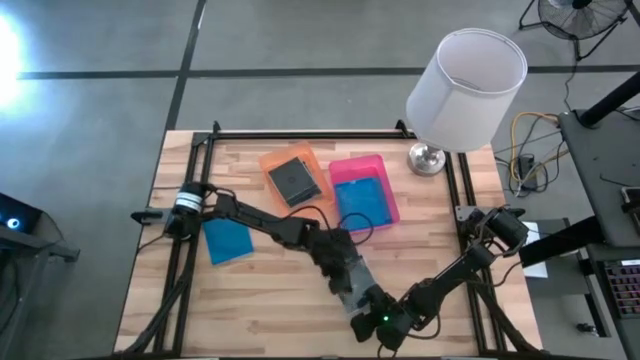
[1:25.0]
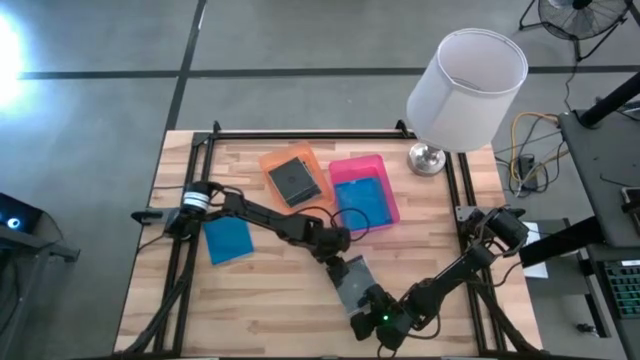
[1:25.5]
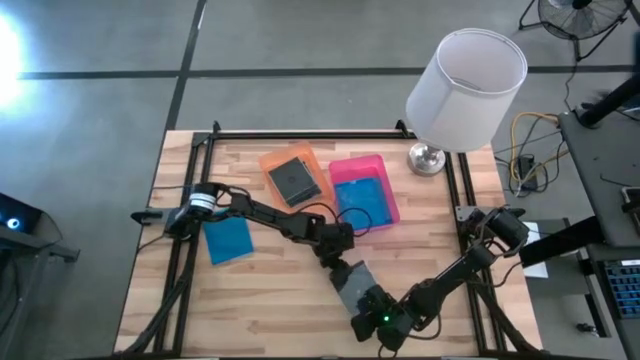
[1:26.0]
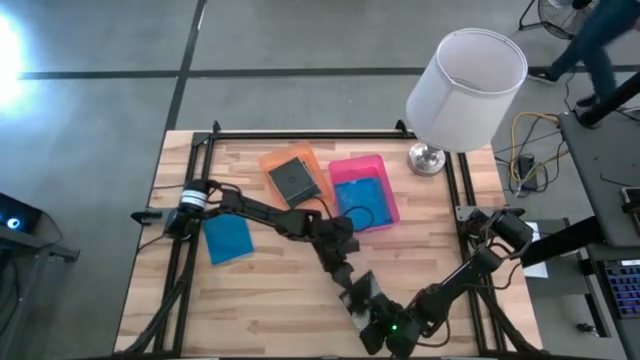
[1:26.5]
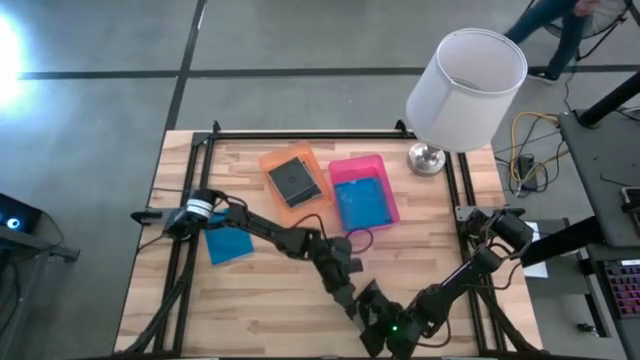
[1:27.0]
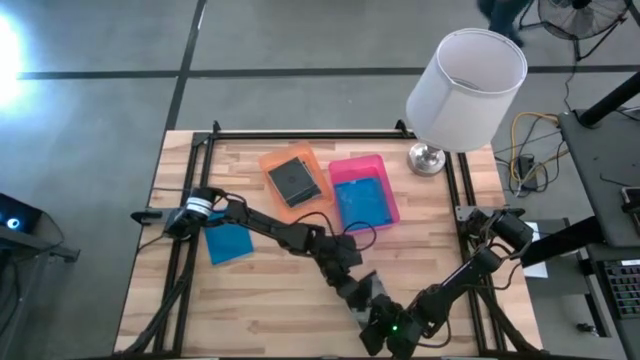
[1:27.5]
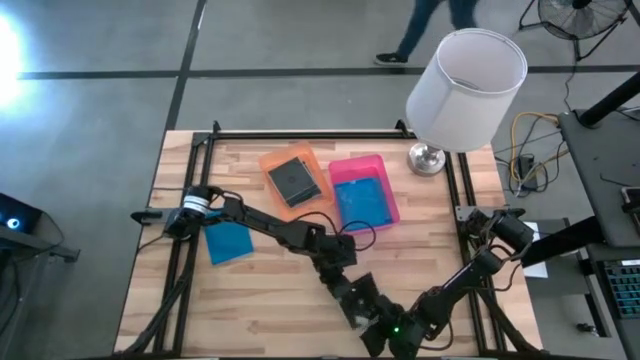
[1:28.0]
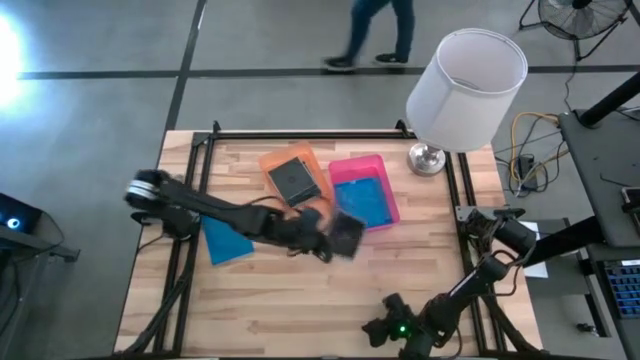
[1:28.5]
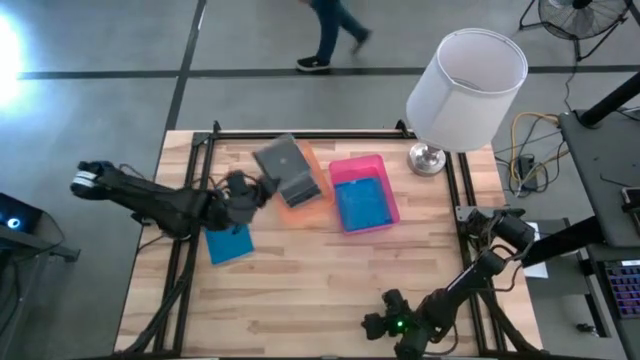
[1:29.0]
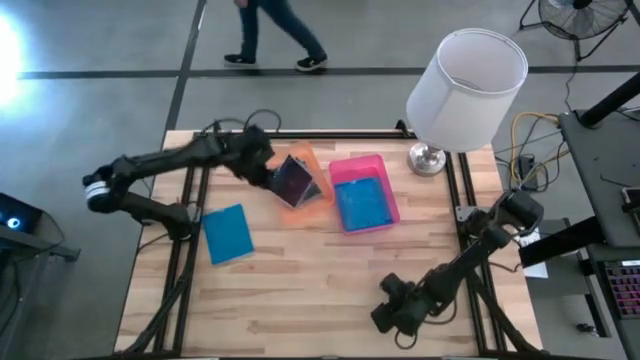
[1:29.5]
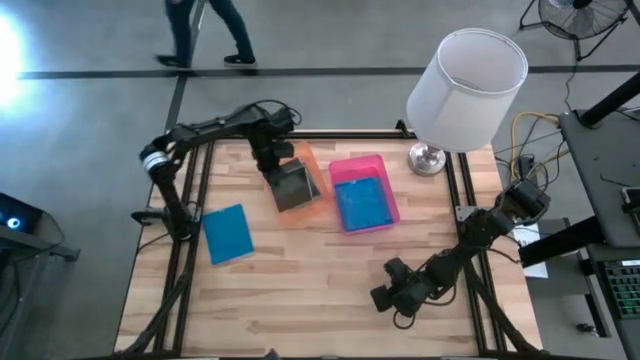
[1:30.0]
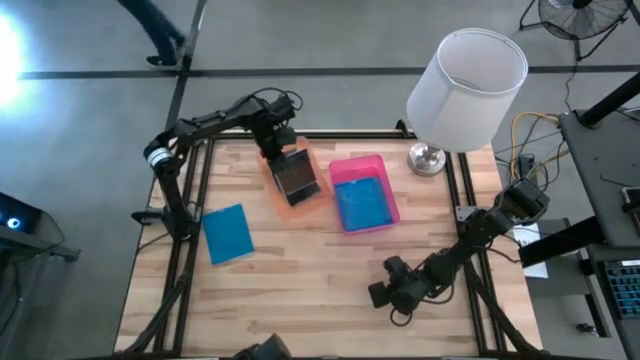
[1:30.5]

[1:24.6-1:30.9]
Task: Pick & place jewel cases by type
Put the black cd case into the orange bin

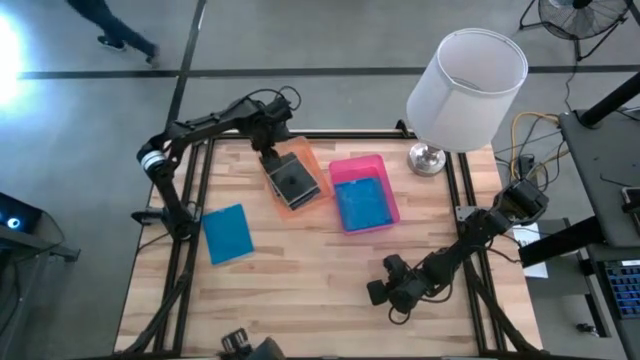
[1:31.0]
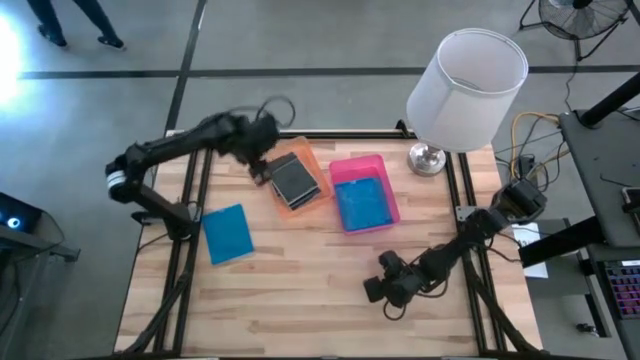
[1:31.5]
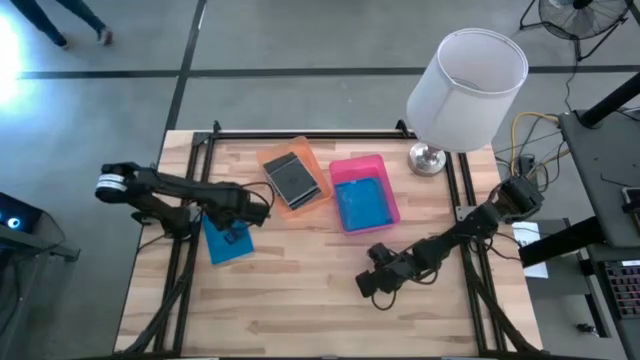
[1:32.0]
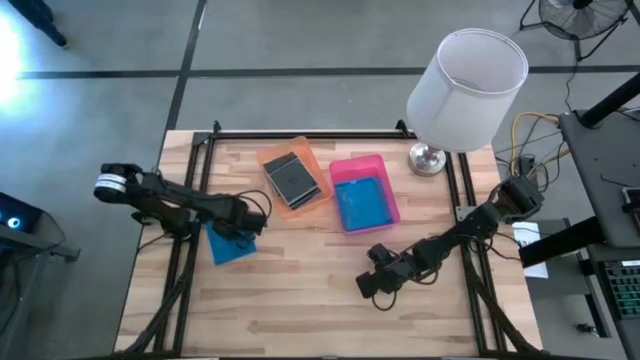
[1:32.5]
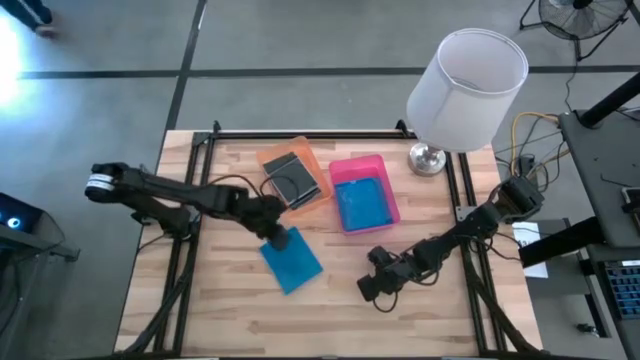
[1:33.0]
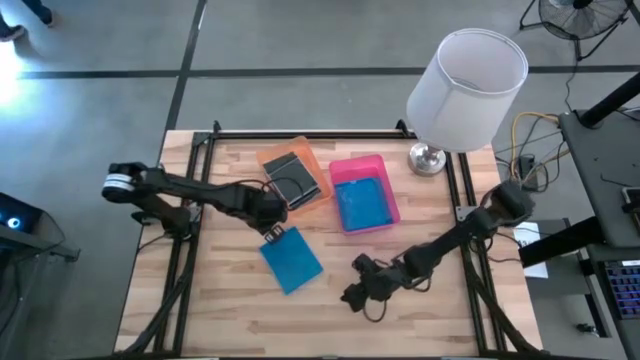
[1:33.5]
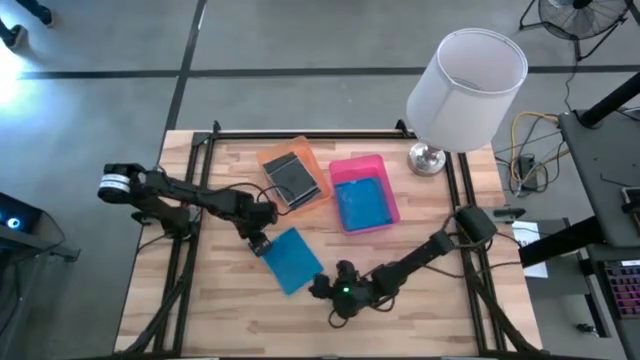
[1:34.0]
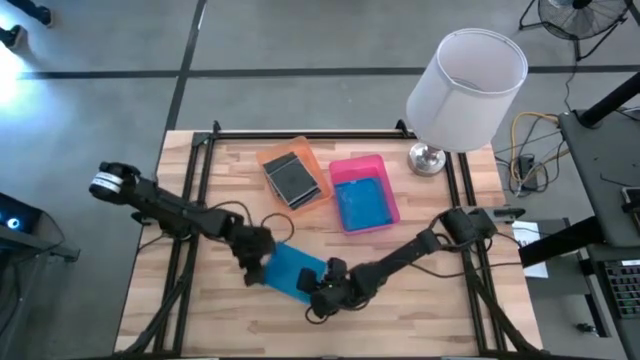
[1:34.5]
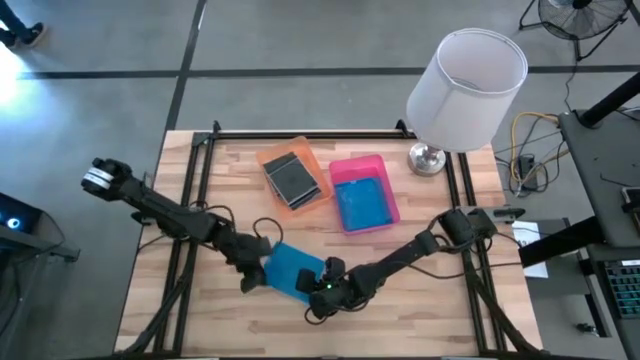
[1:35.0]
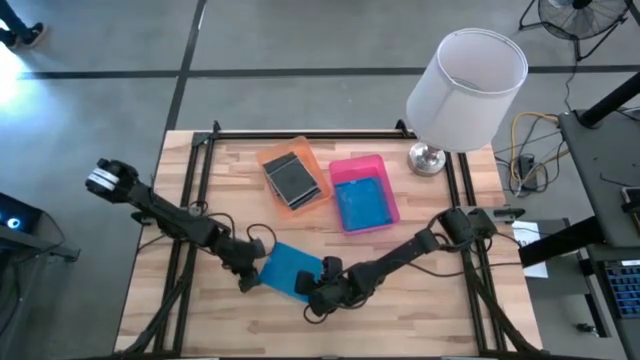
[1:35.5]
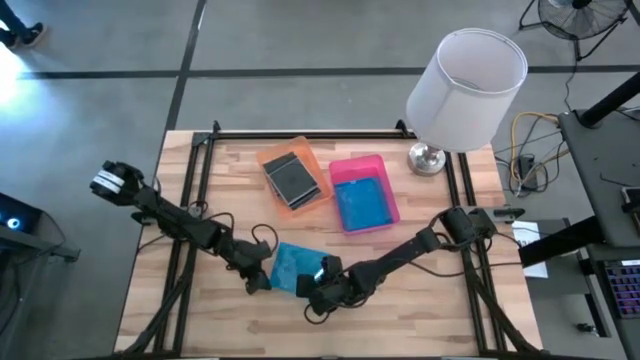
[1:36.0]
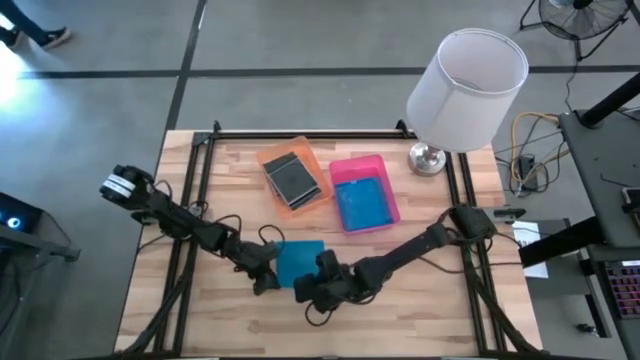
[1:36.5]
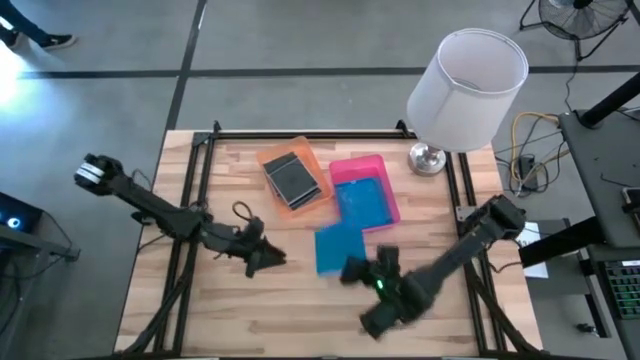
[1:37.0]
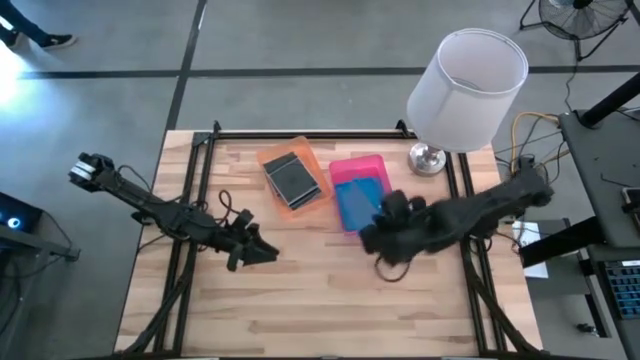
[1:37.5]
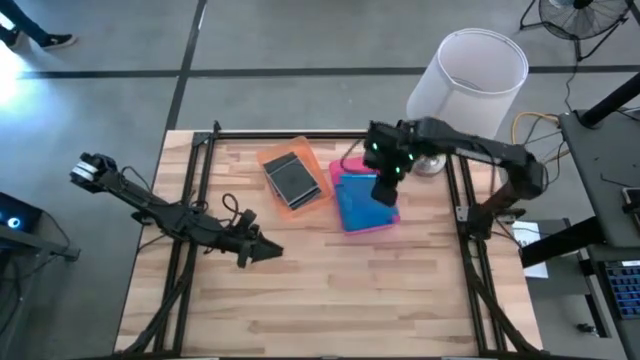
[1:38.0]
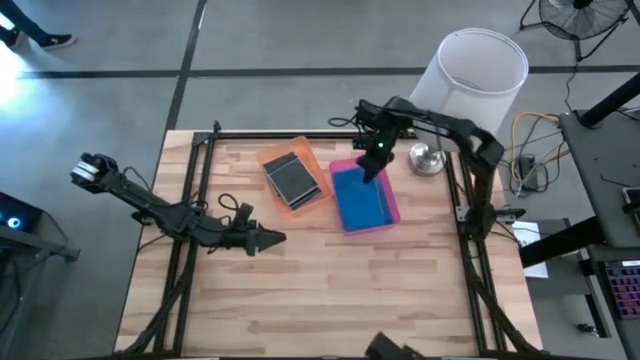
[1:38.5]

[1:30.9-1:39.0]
Put the blue cd case into the pink bin

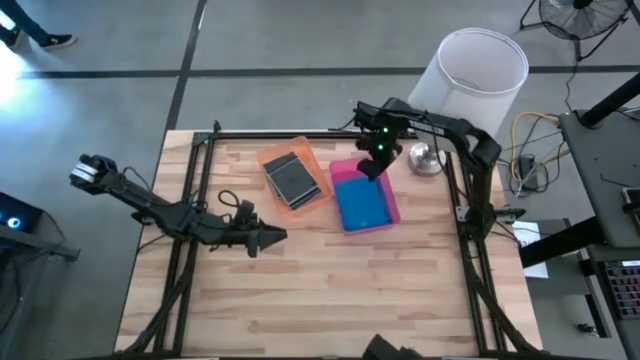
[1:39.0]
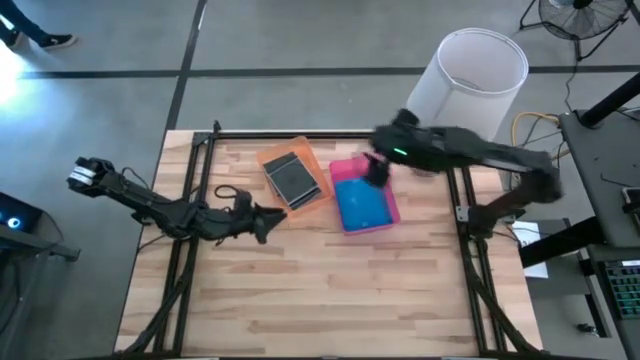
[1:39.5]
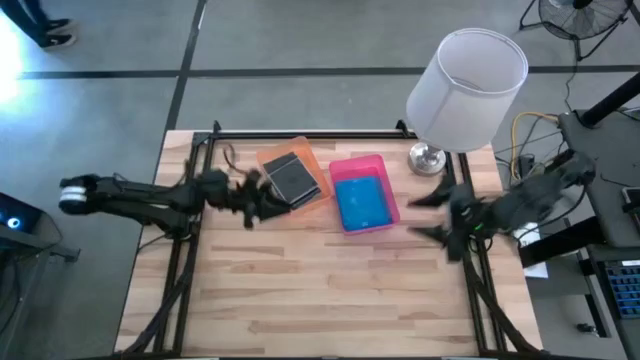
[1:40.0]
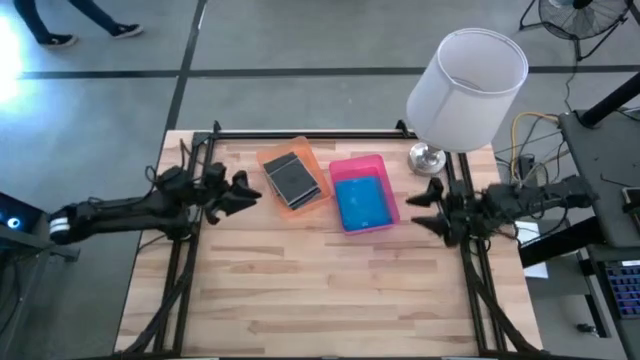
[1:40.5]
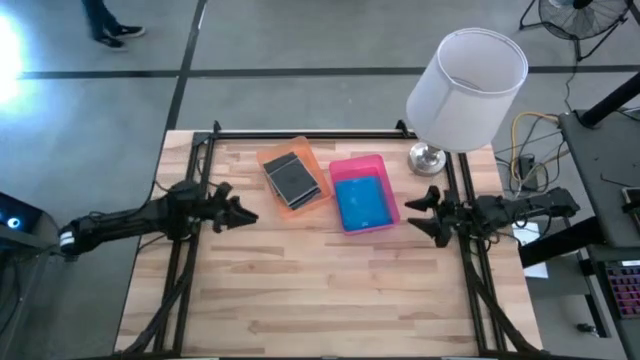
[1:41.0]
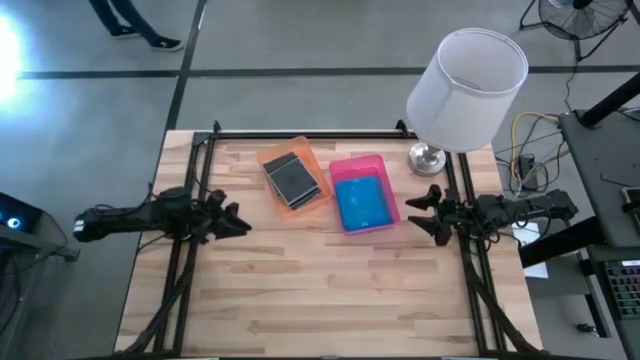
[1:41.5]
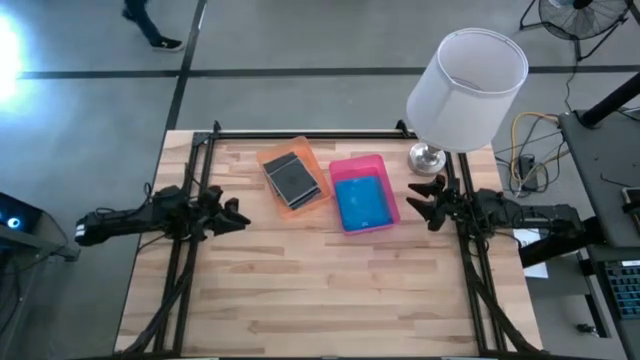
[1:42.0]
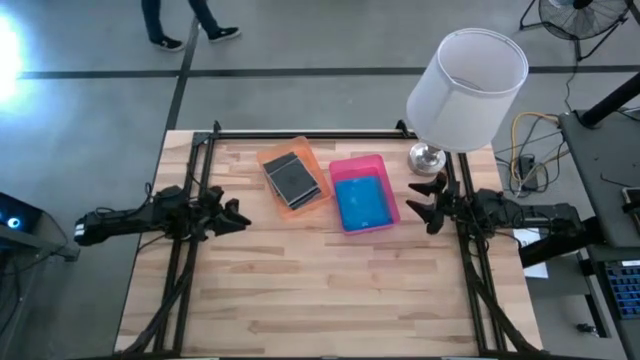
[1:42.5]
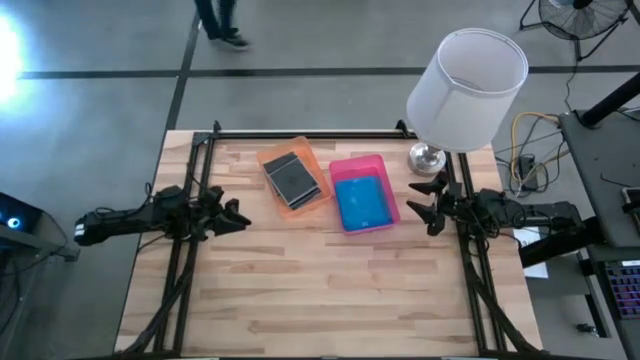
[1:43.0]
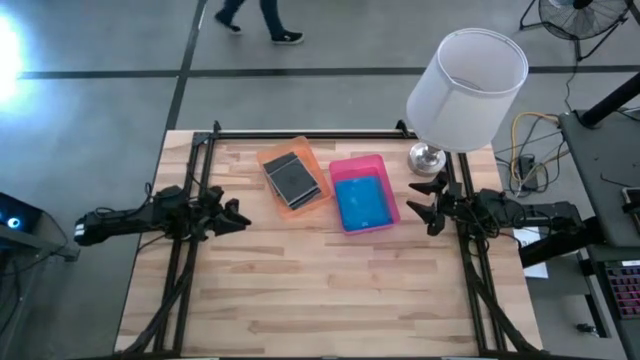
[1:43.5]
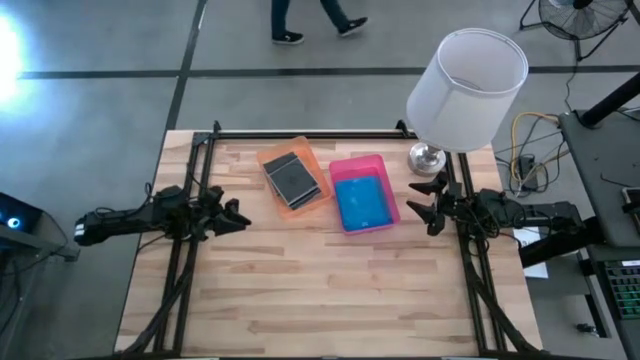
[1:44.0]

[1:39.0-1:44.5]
Return to Home Position

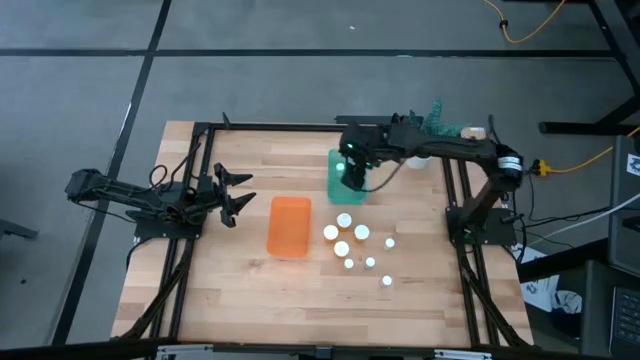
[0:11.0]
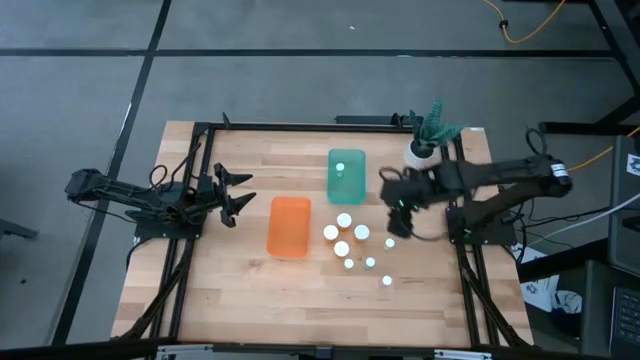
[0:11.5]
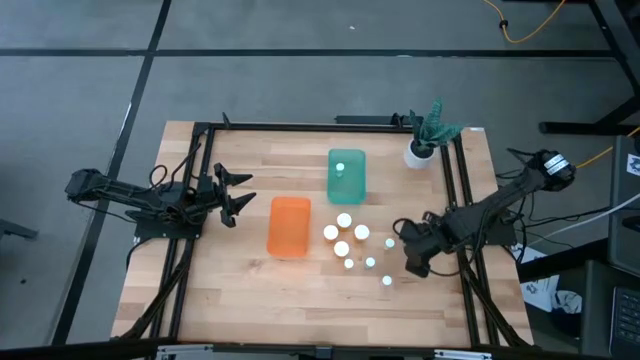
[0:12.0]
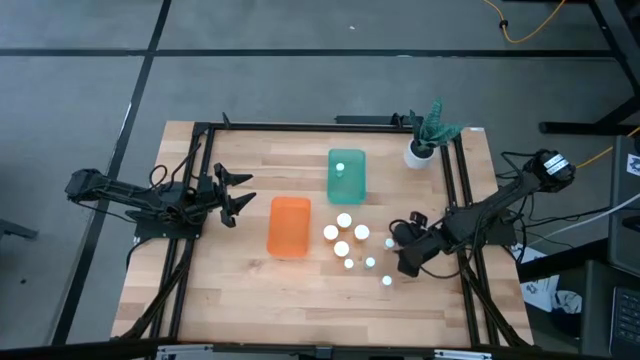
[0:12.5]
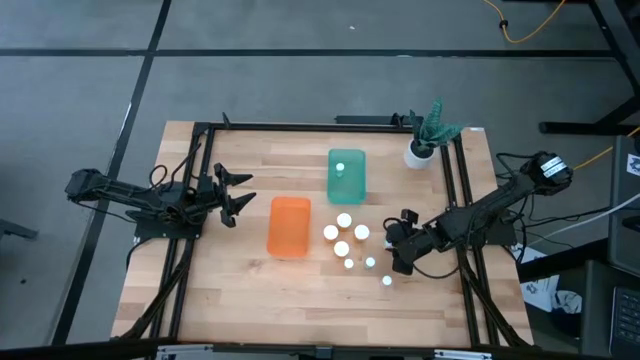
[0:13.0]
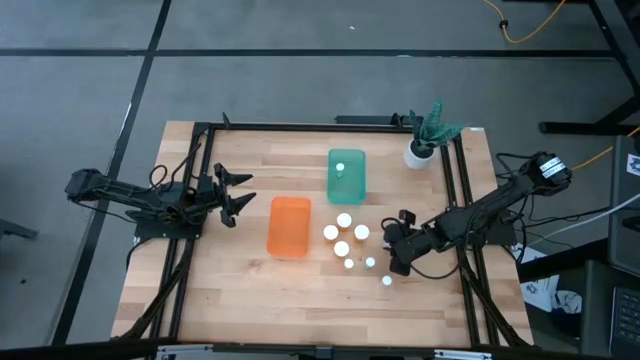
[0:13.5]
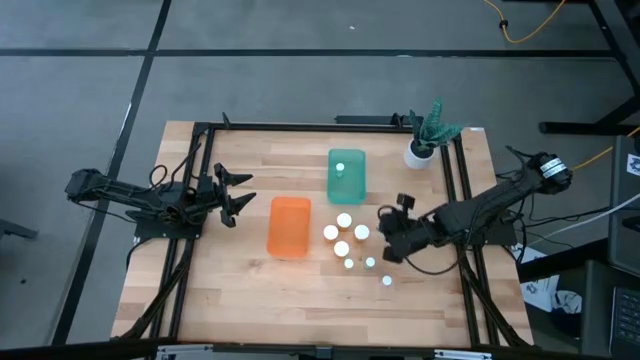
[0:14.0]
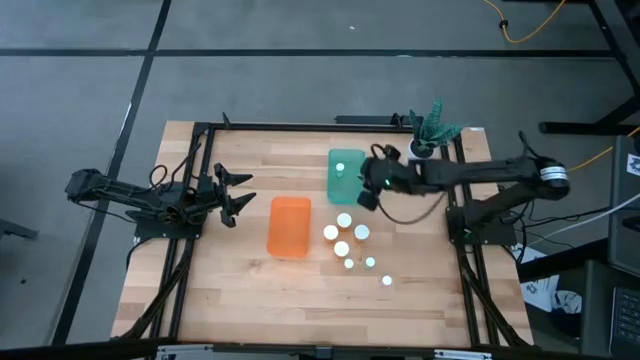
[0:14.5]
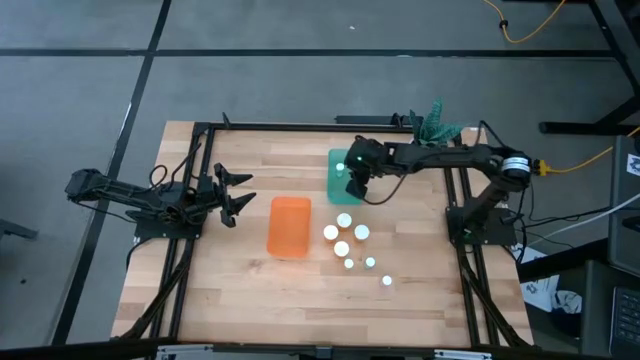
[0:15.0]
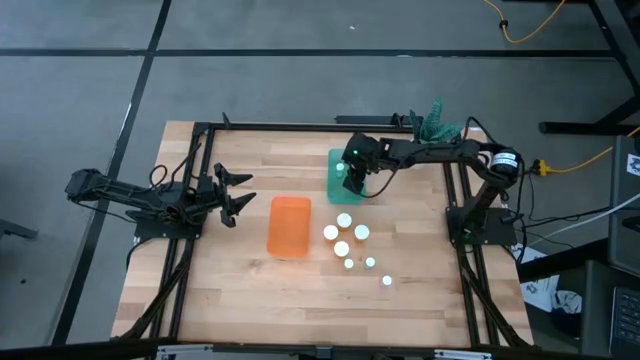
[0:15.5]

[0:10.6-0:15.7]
Task: Pick and place medicine bottles into bin by pill shape (circle, oval)
Put the small yellow medicine bottle into the blue bin
